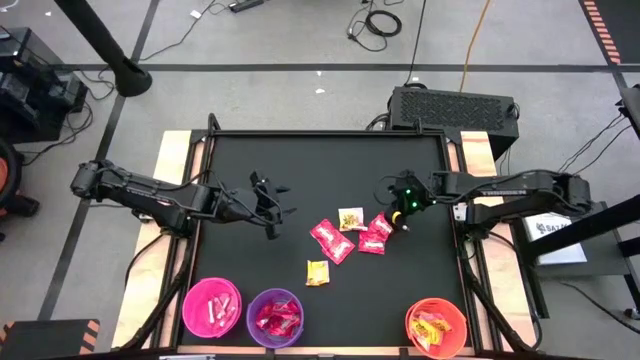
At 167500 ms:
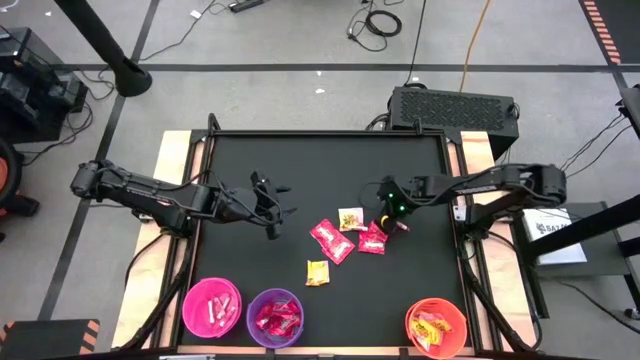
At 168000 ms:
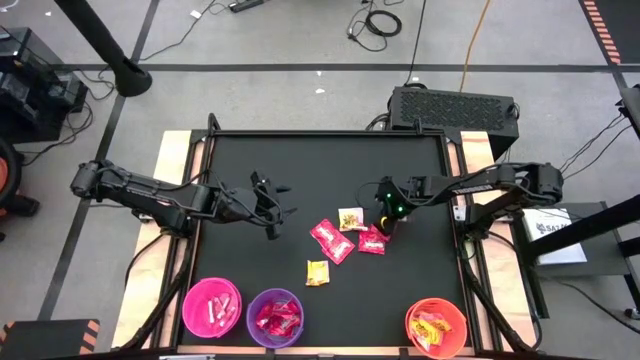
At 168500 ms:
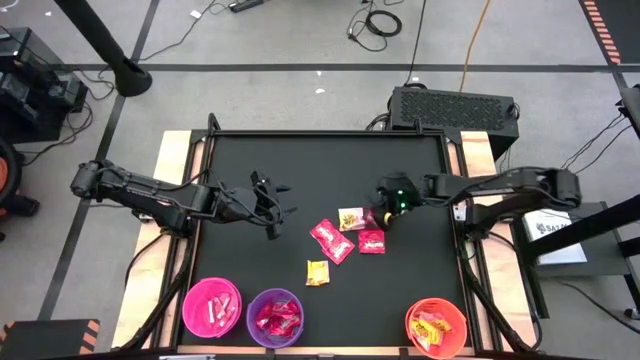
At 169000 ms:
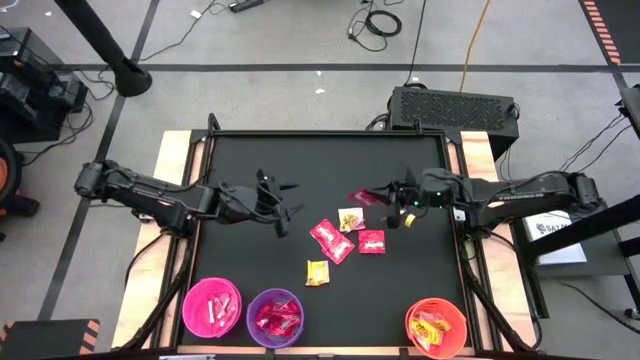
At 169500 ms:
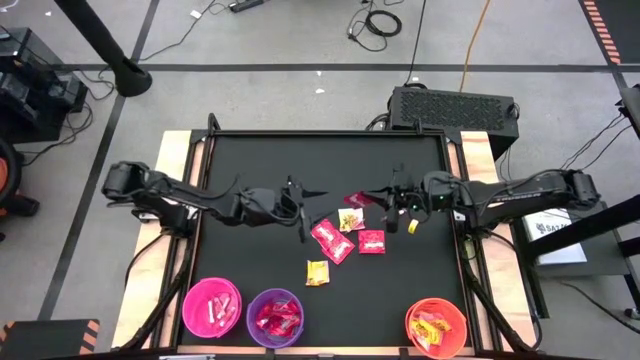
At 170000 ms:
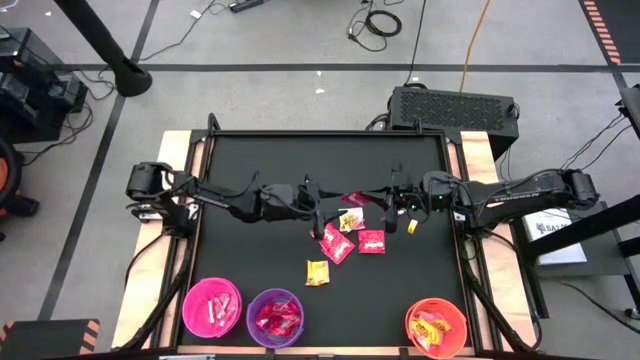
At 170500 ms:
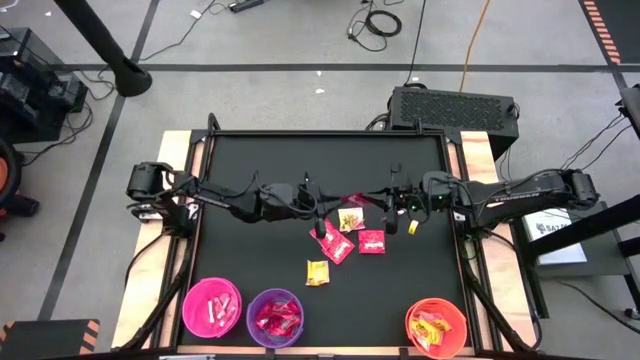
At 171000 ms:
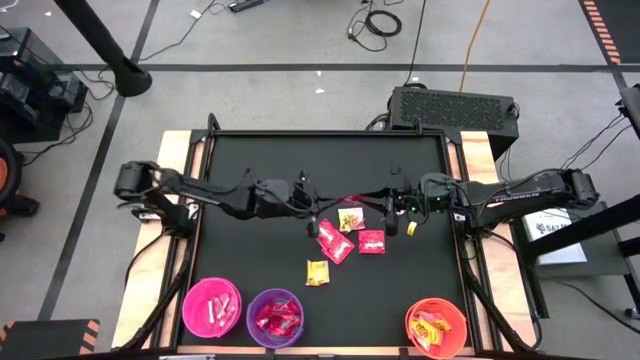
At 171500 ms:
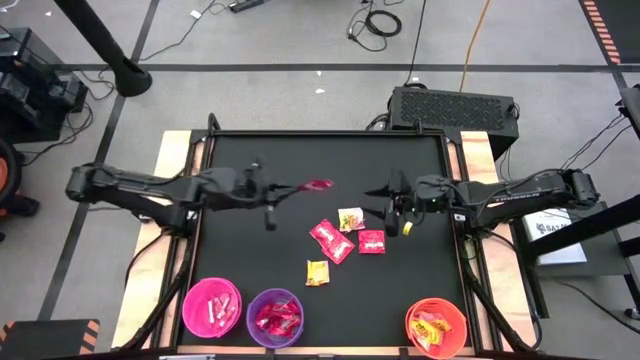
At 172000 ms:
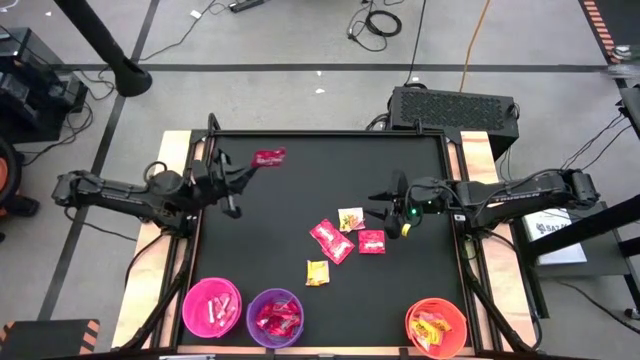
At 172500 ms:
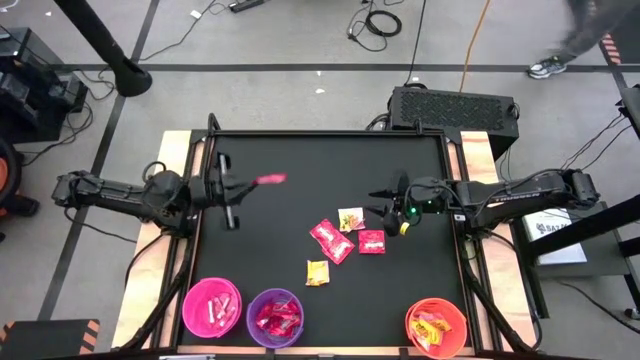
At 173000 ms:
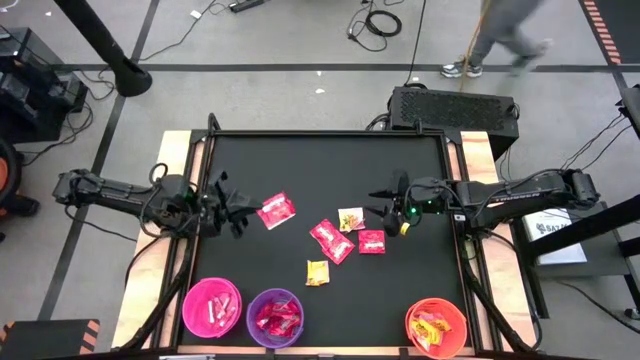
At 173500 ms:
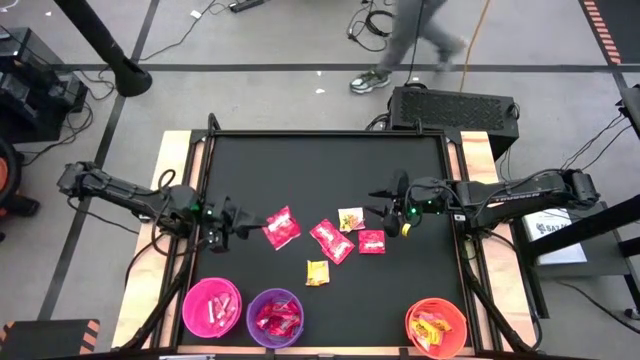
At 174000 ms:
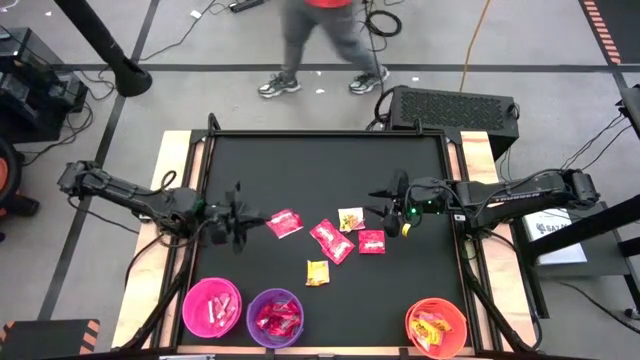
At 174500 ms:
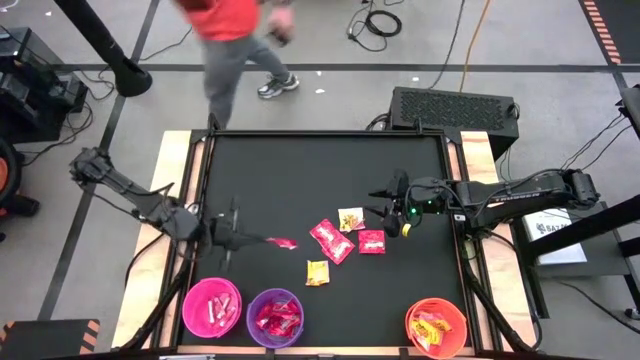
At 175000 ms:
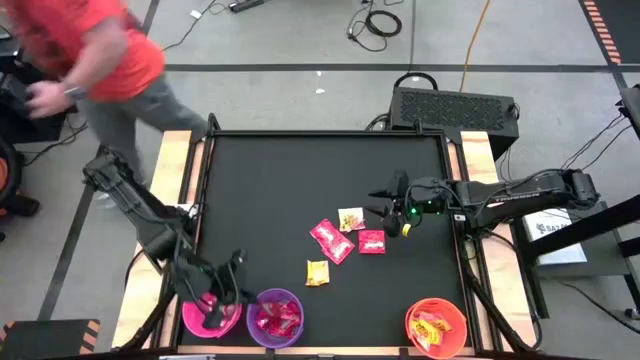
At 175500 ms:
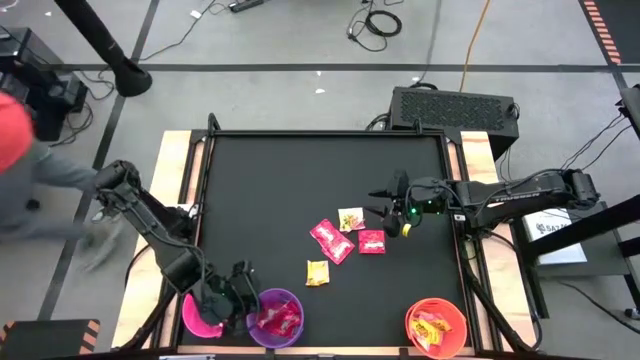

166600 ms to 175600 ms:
Task: Sort candy by brand, put in halloween buckets
Put the red candy into the violet bucket

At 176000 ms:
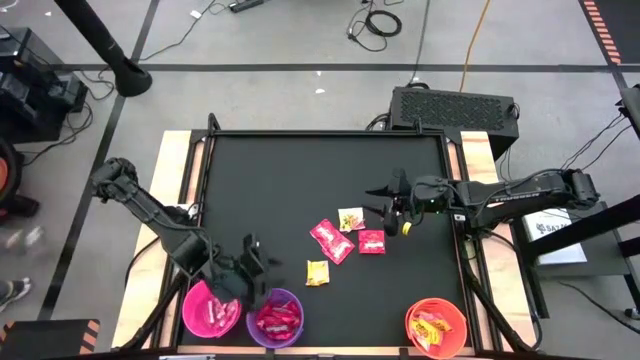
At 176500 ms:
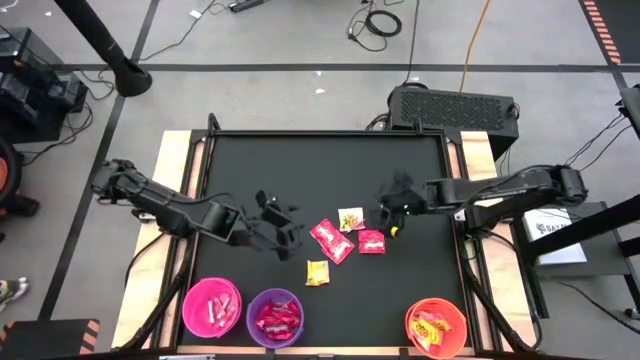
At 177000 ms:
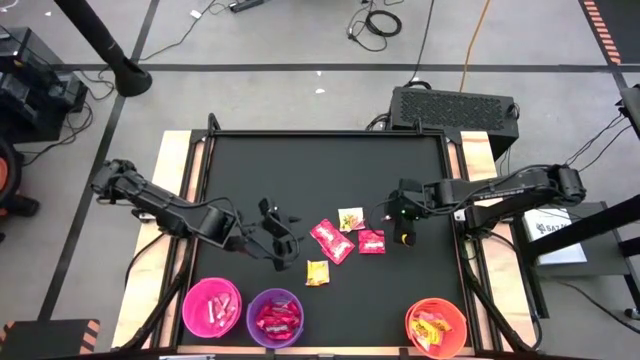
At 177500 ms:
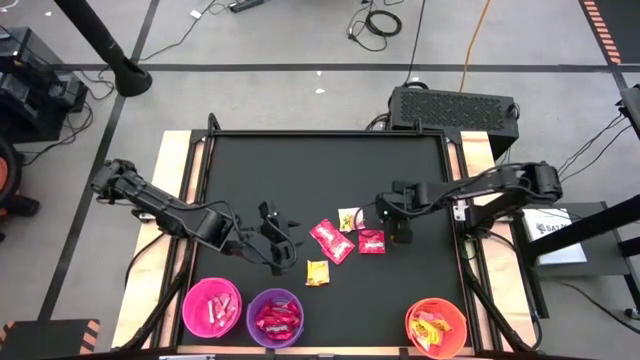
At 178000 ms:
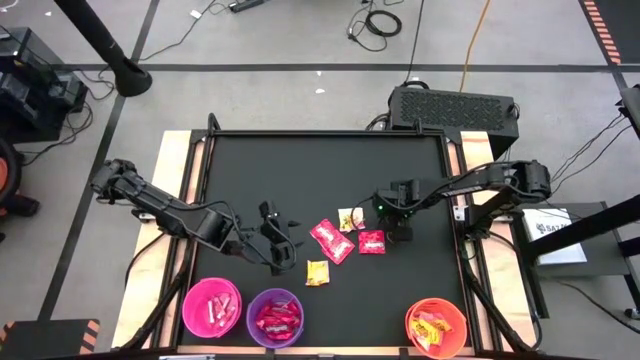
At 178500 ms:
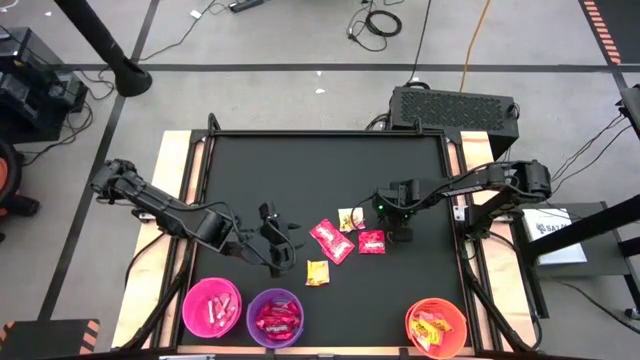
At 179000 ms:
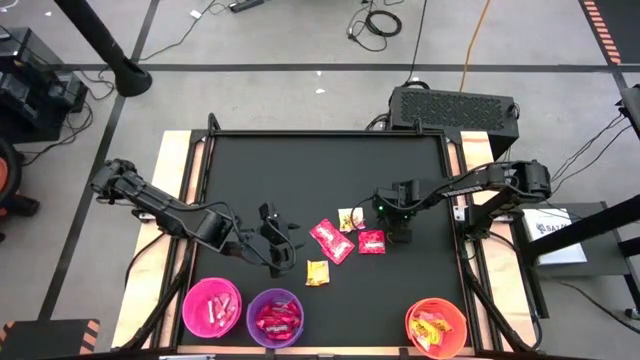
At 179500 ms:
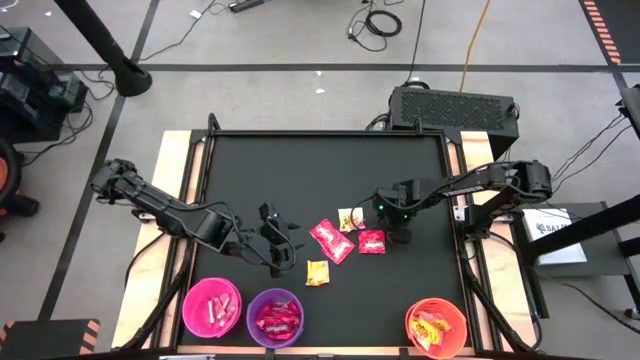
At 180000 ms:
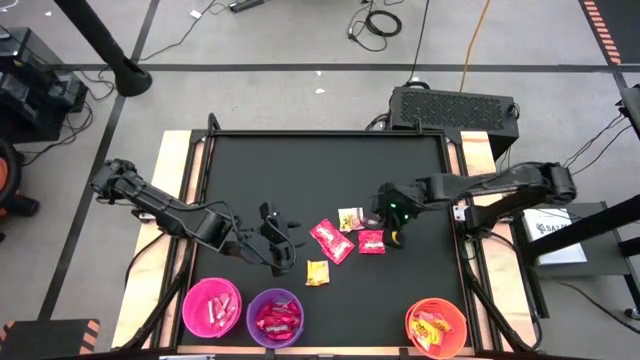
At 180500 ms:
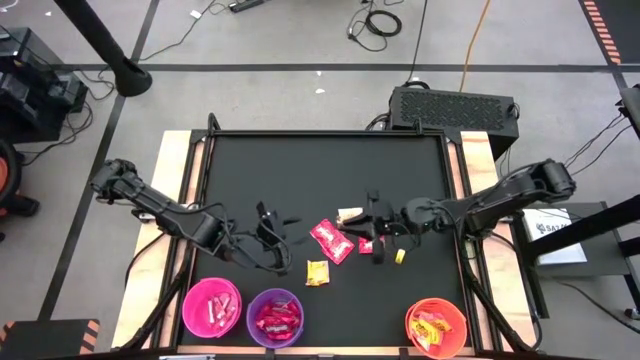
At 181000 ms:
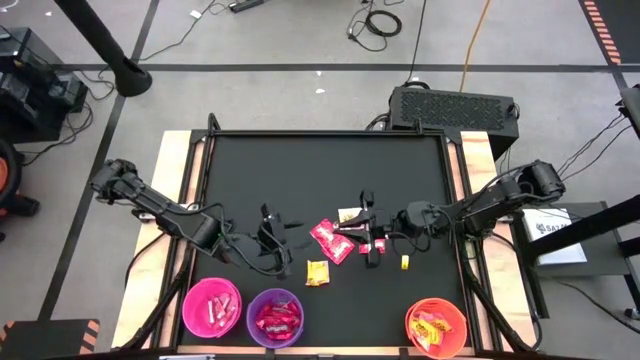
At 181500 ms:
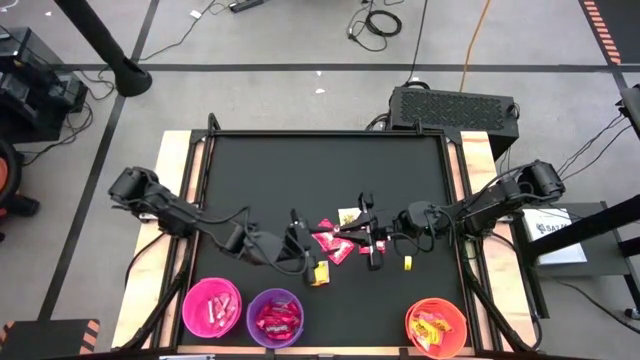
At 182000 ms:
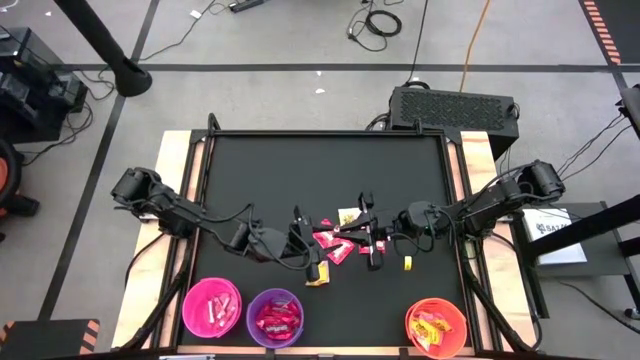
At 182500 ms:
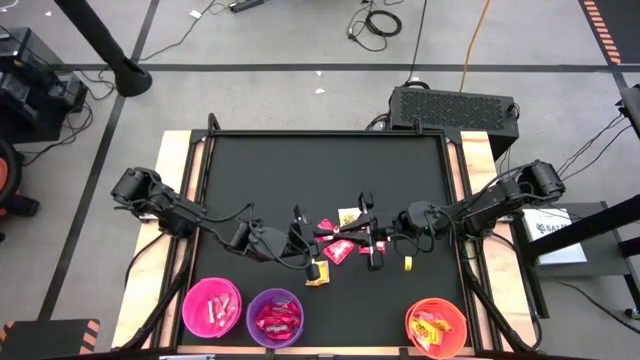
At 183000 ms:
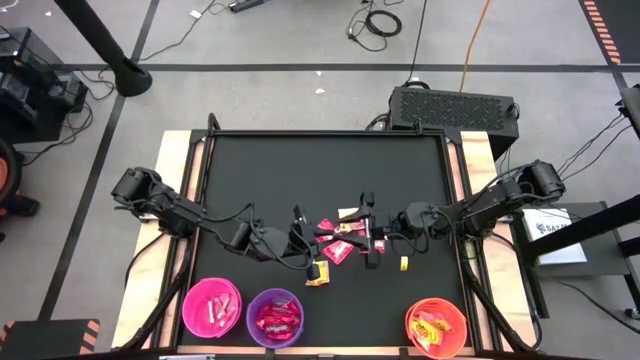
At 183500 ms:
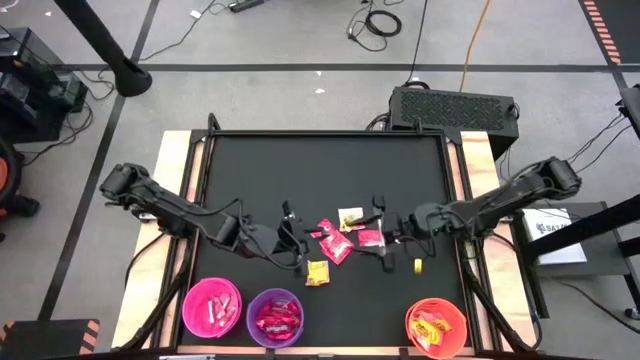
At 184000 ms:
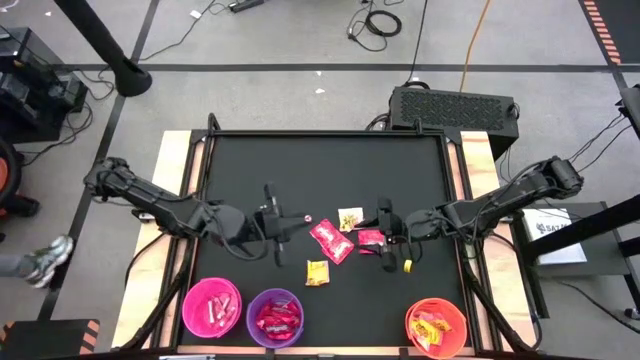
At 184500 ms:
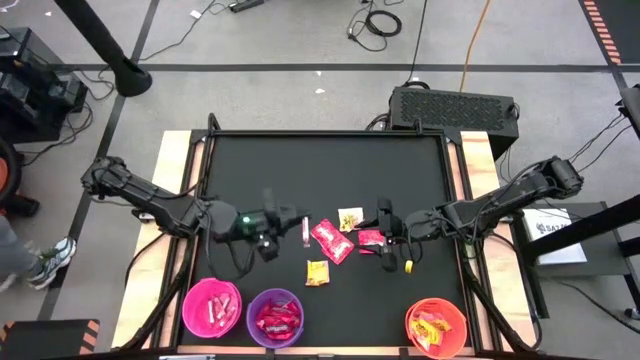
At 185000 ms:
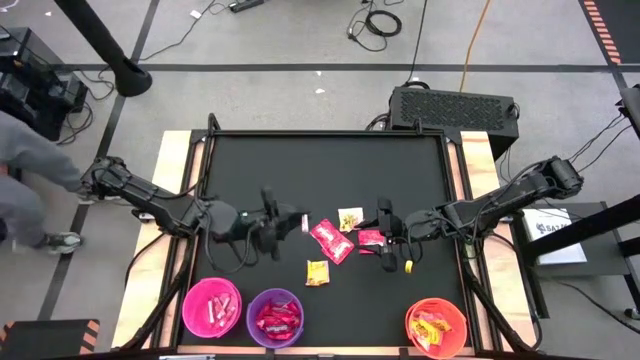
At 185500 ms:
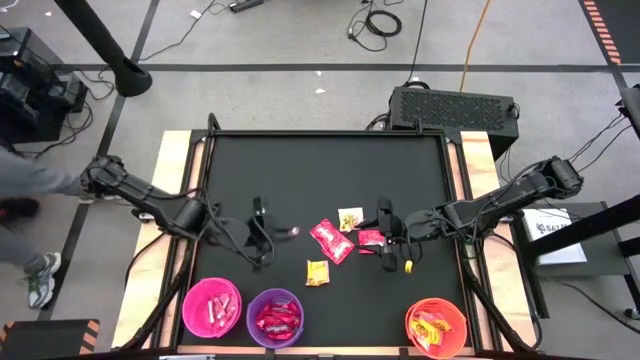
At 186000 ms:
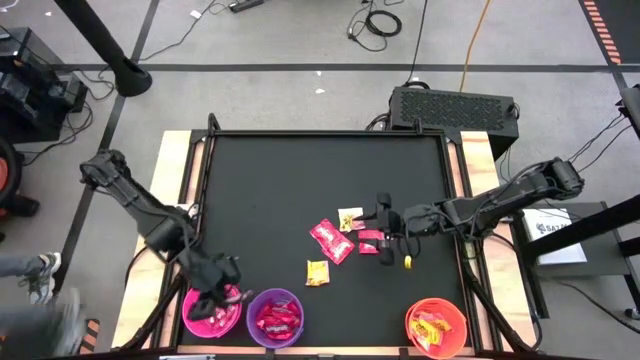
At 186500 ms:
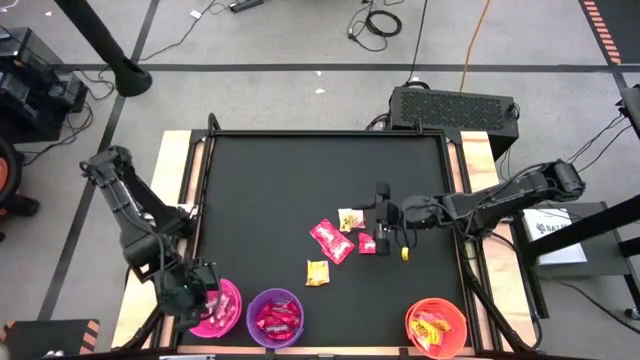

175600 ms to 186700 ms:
Put the orange candy into the pink bucket

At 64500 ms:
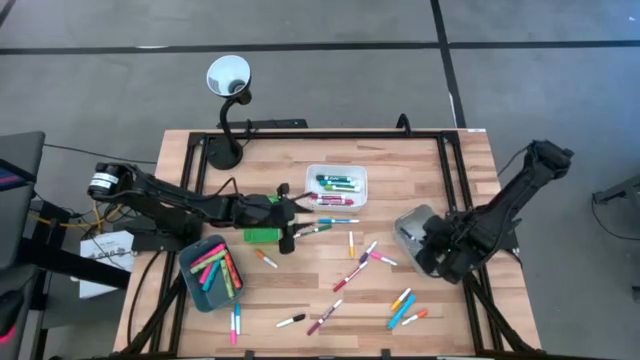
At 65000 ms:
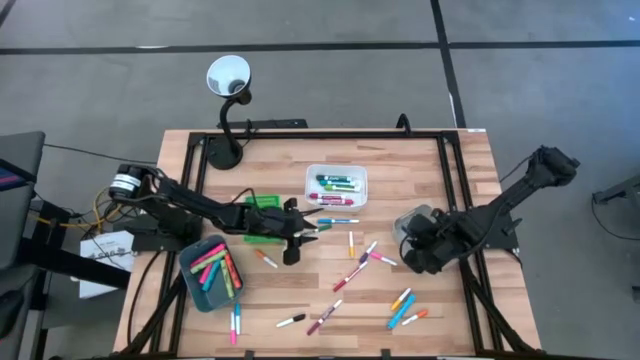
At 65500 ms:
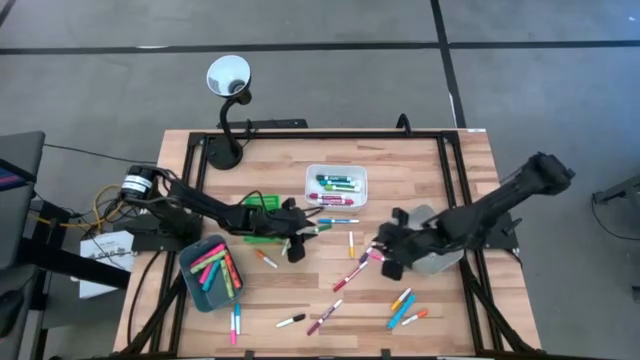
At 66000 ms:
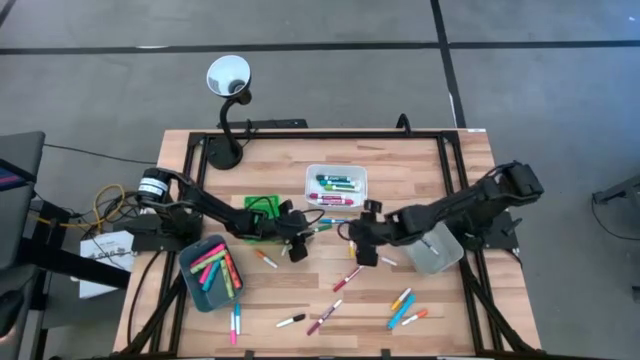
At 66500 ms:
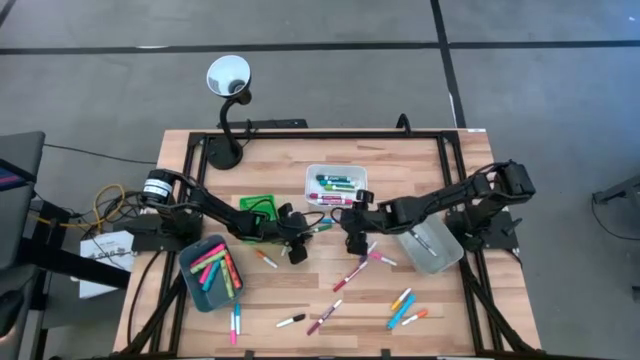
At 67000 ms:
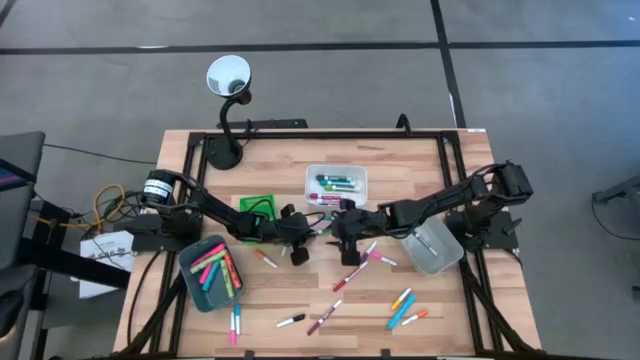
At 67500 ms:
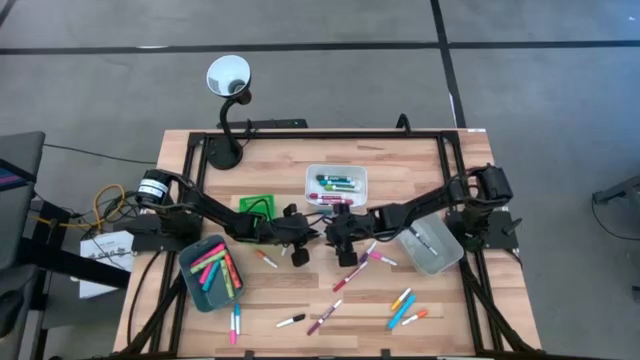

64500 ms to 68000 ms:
Task: Pick & Place Markers
Put the small green marker pen into the gray bin
